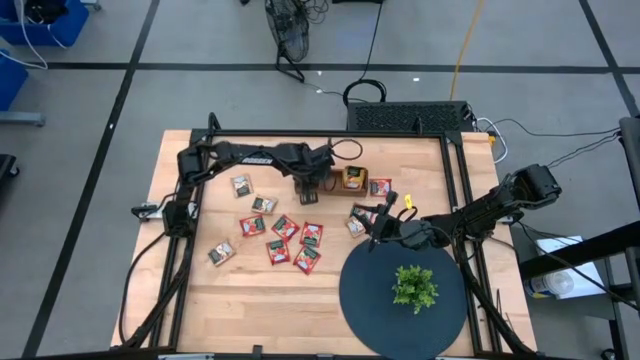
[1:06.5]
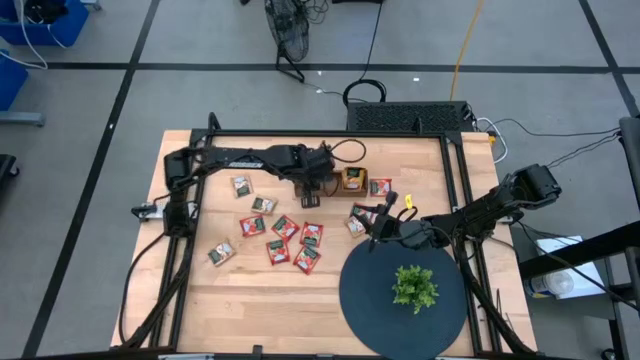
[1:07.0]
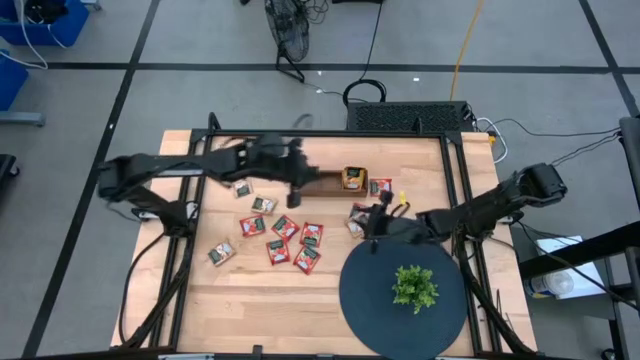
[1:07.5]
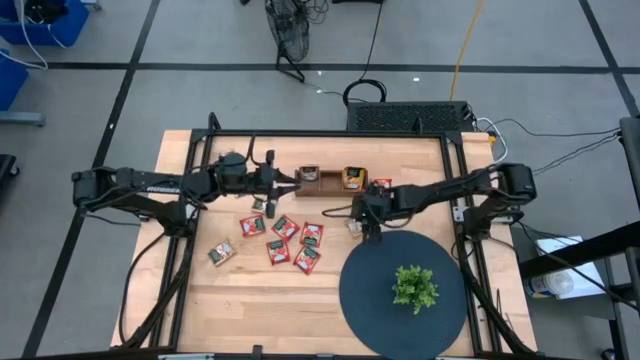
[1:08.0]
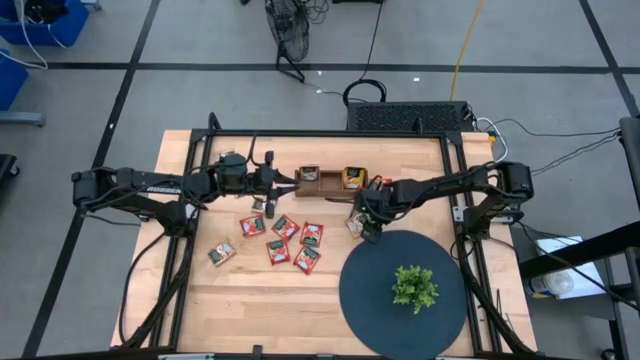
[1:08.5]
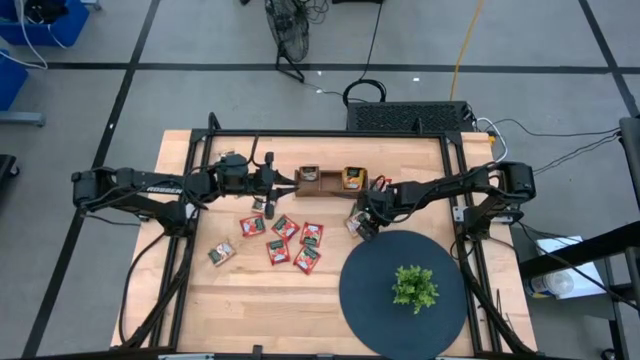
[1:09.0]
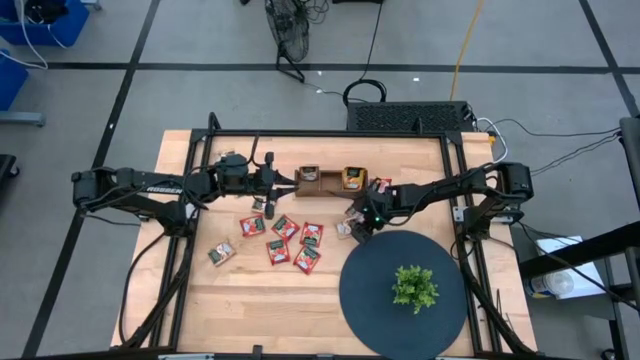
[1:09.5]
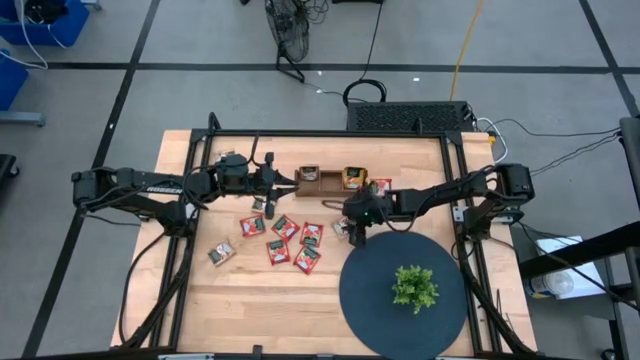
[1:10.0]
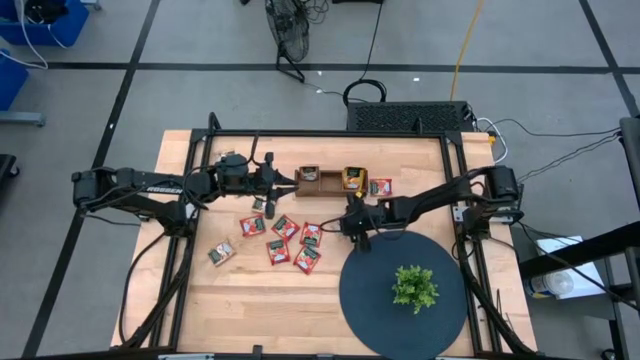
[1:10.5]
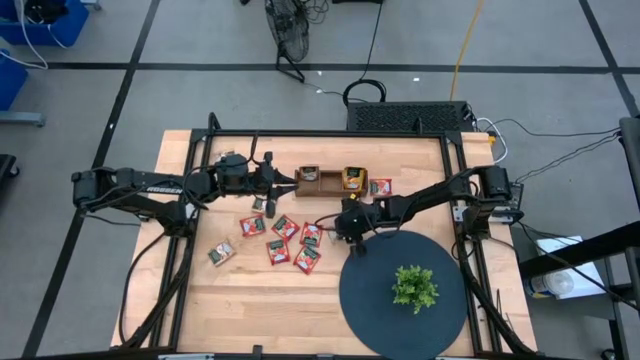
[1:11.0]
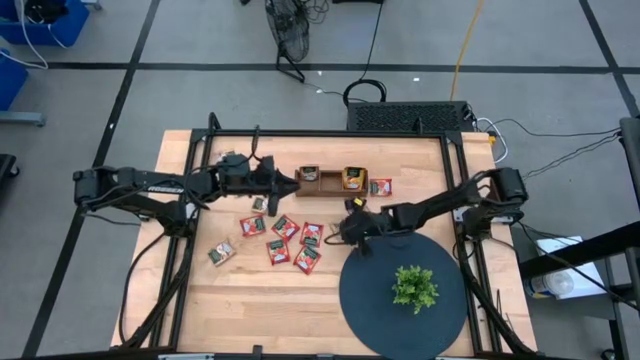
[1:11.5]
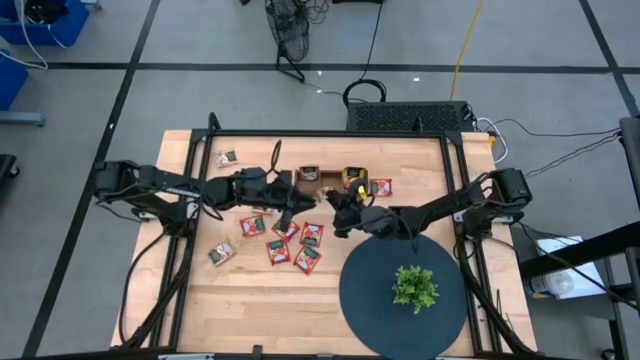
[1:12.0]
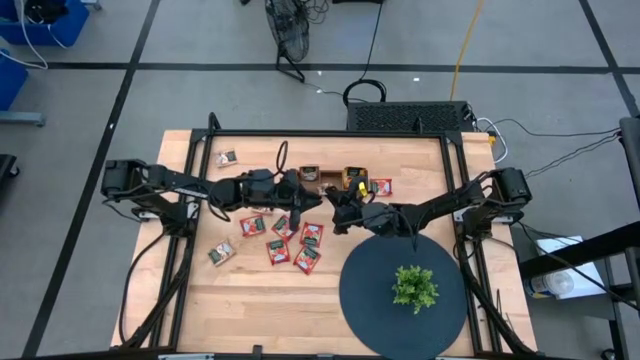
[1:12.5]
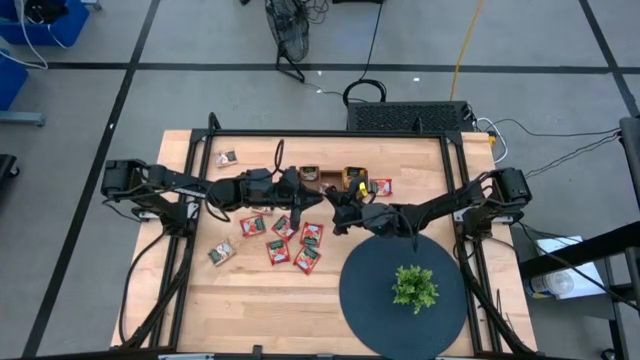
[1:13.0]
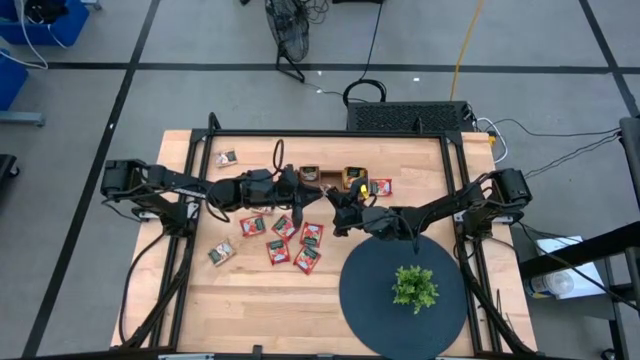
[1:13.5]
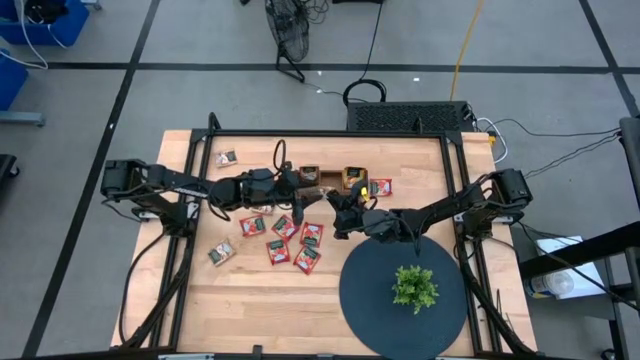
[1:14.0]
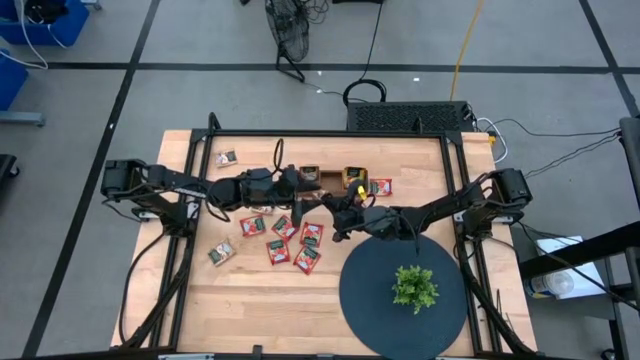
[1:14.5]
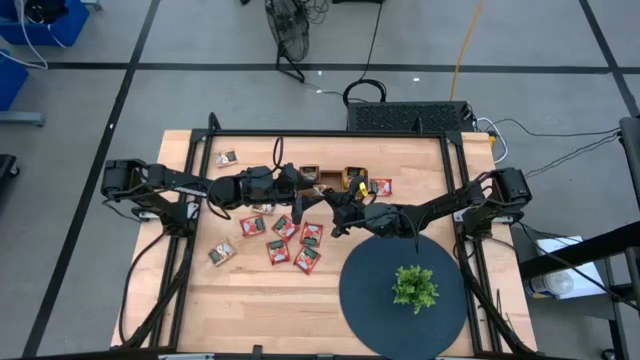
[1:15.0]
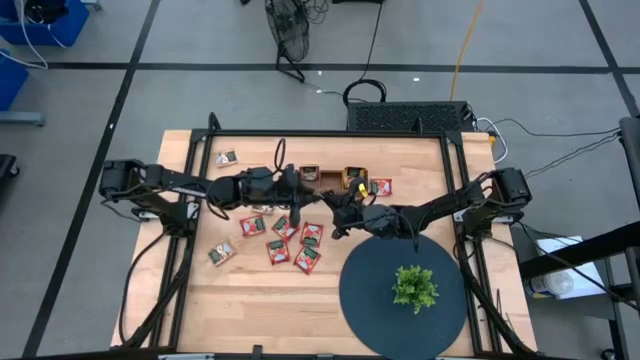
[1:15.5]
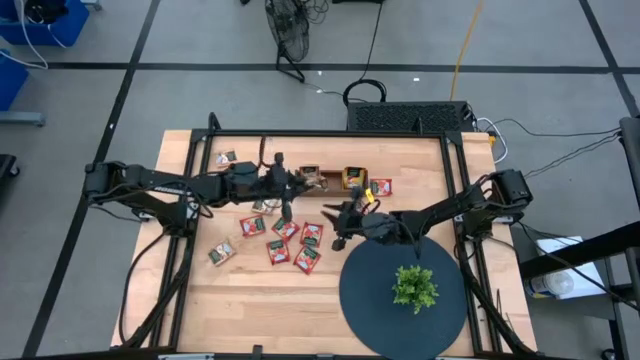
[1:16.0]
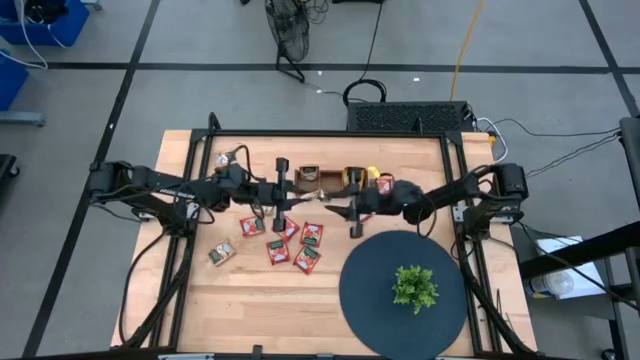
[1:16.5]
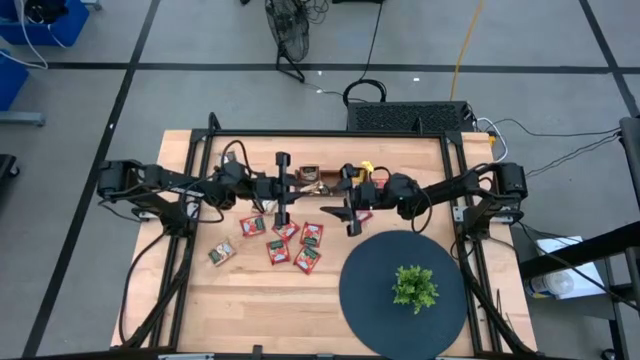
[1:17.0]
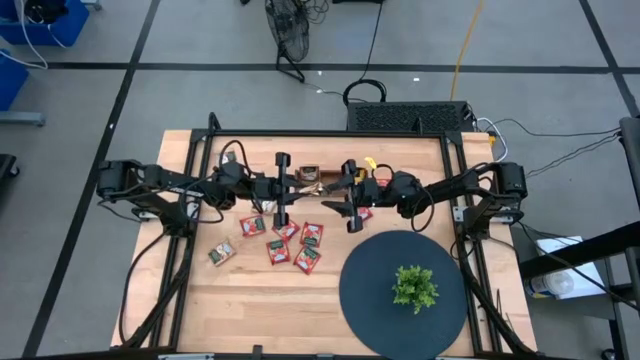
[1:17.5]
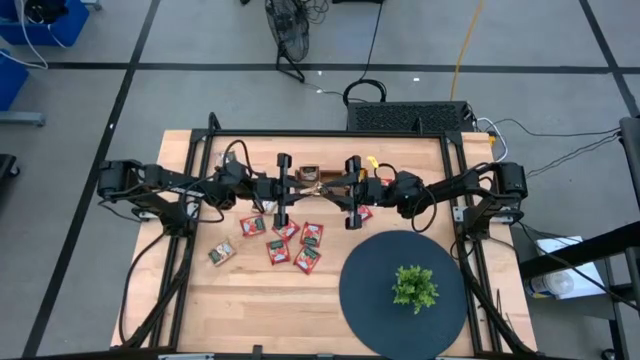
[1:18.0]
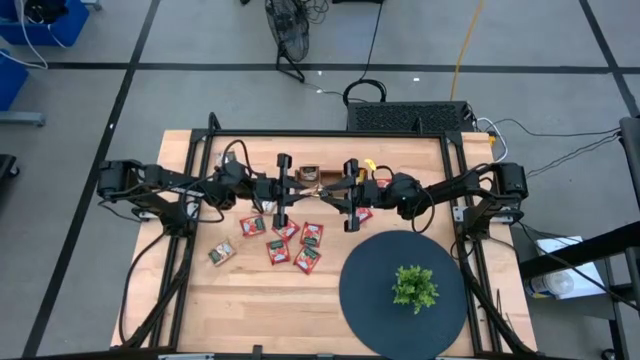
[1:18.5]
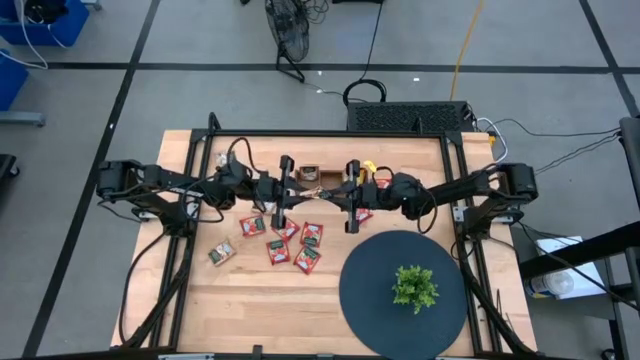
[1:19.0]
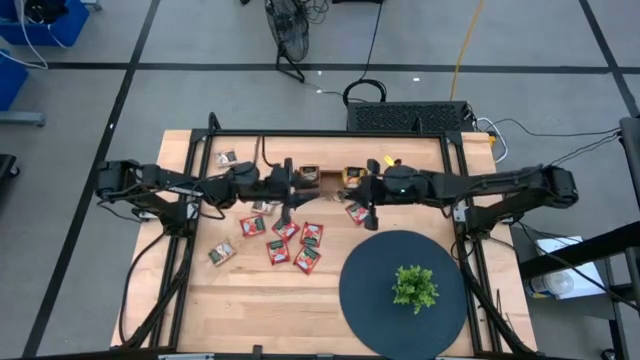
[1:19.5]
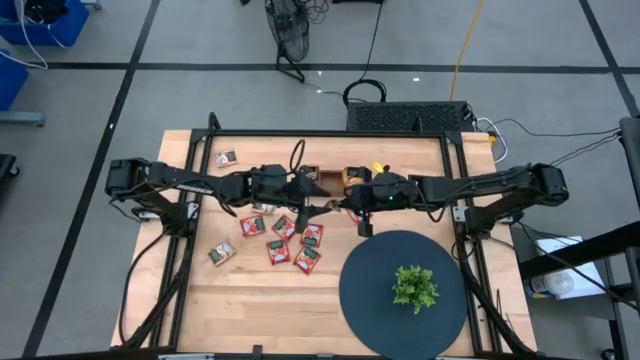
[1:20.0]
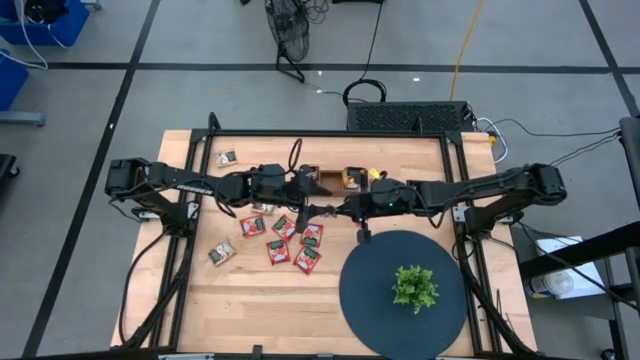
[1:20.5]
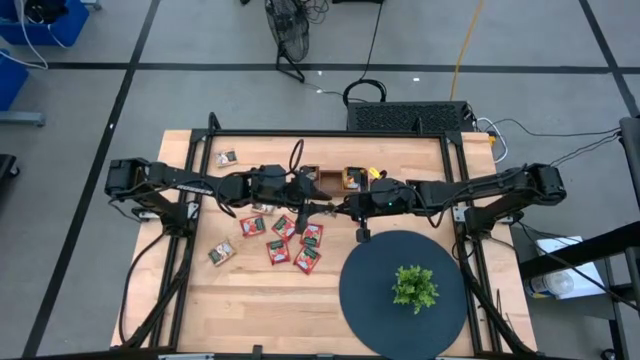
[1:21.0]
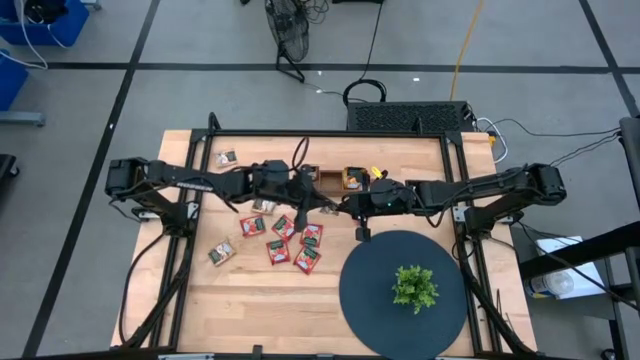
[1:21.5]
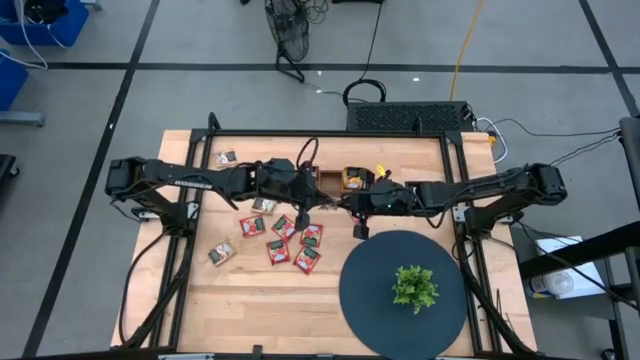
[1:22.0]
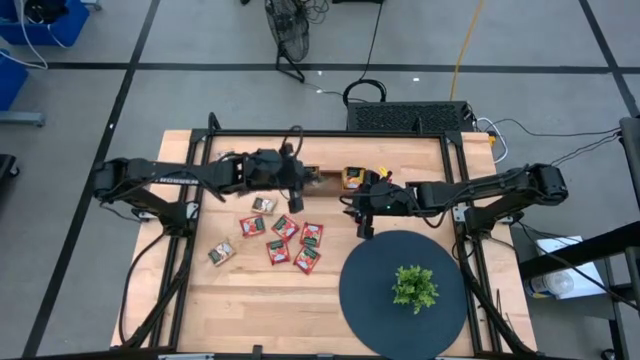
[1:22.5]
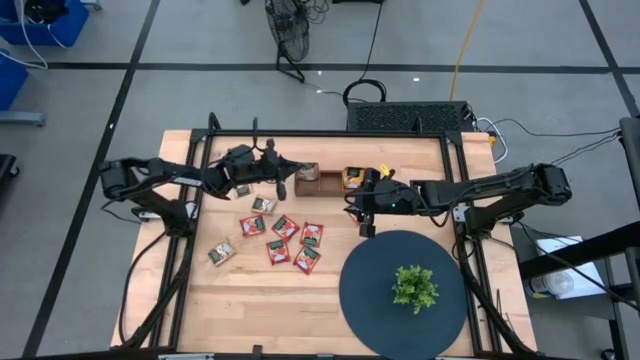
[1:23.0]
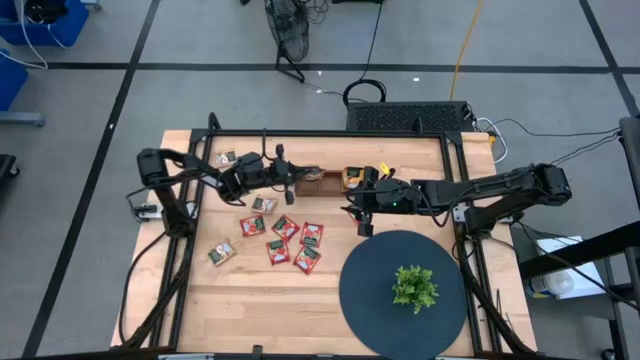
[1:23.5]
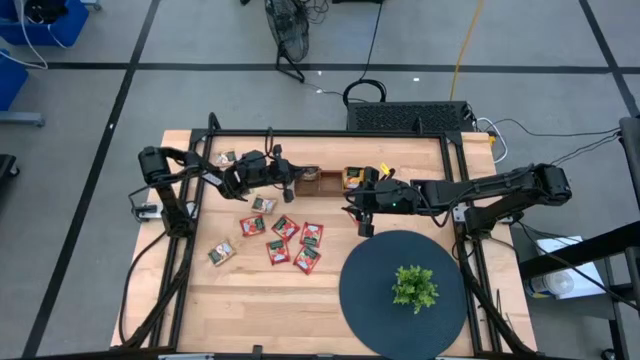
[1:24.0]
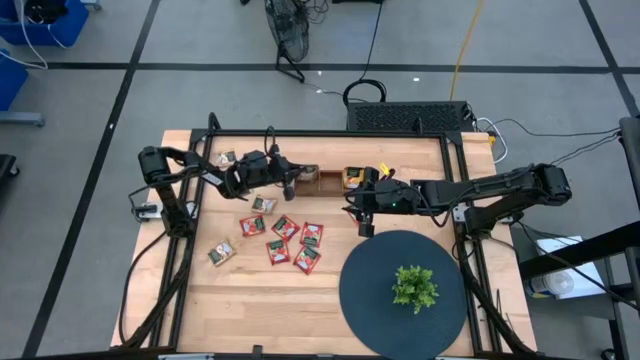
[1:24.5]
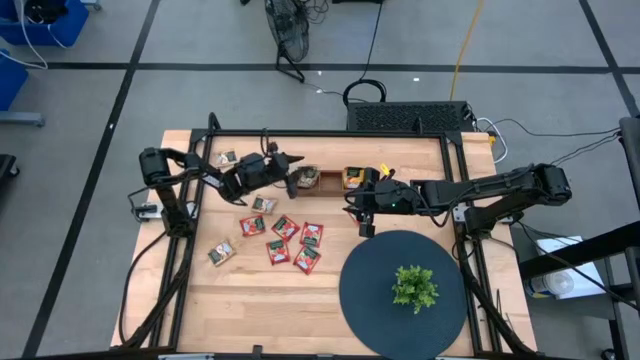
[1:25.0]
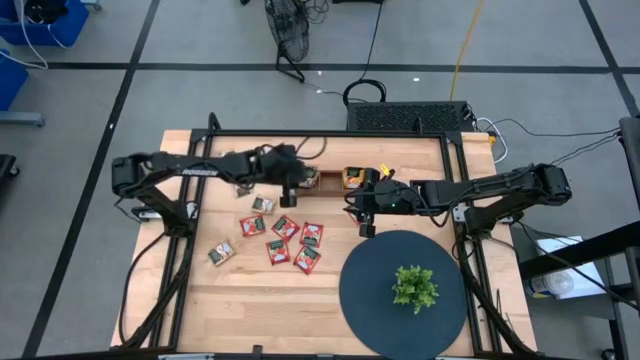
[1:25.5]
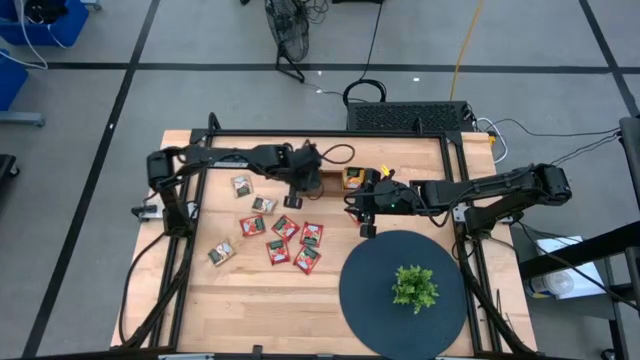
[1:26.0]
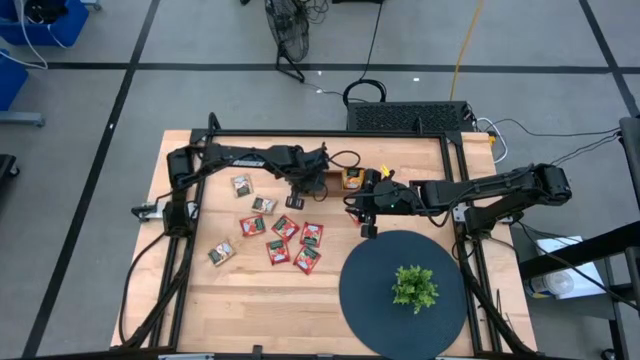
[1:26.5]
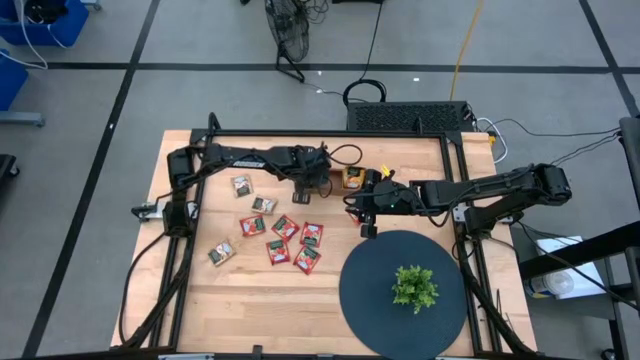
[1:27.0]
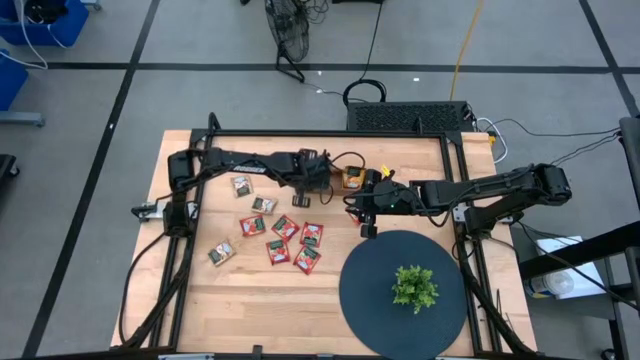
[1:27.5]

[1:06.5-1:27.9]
Task: Pick & Place Tea
Put the brown tea bag into the left section wooden organizer
